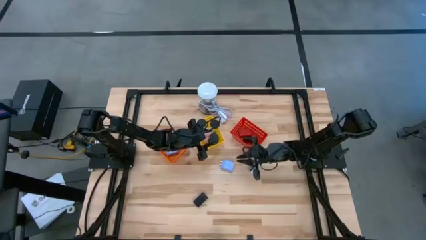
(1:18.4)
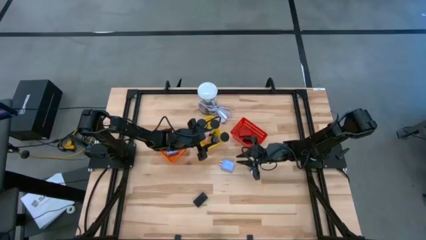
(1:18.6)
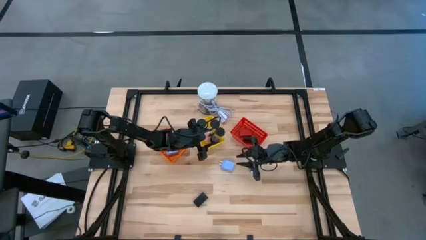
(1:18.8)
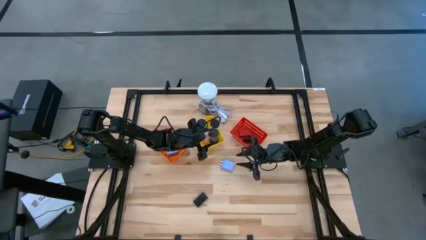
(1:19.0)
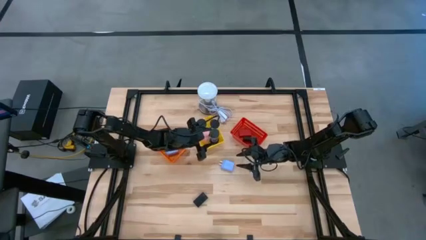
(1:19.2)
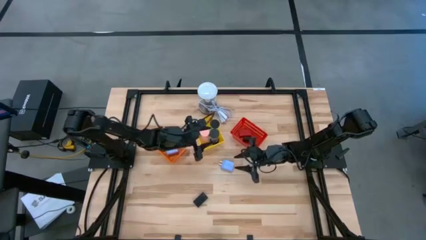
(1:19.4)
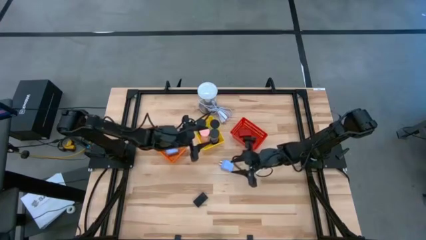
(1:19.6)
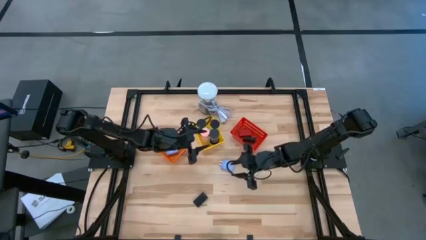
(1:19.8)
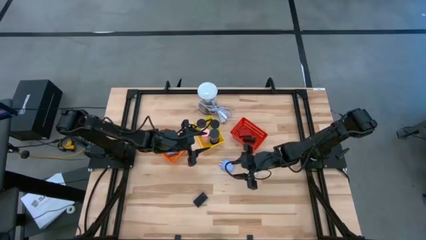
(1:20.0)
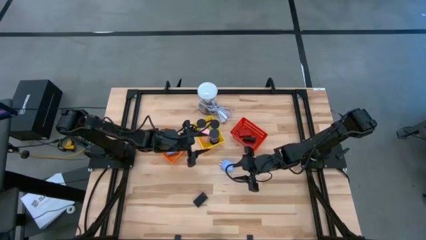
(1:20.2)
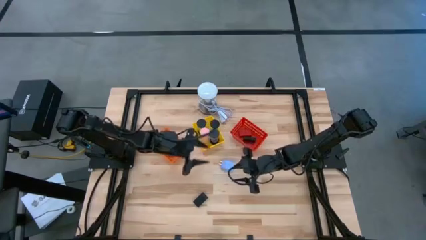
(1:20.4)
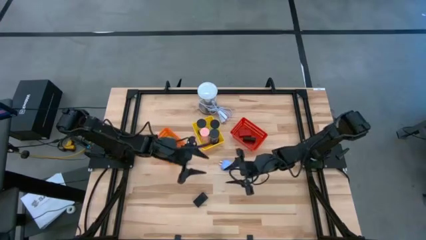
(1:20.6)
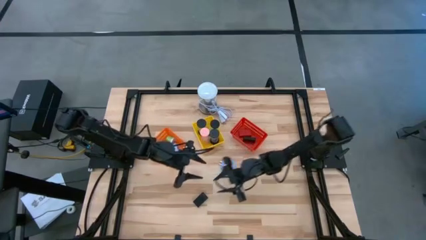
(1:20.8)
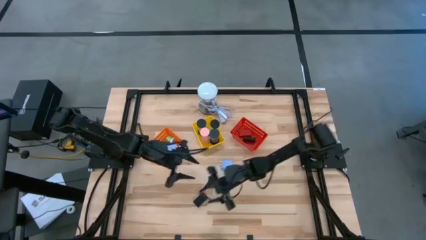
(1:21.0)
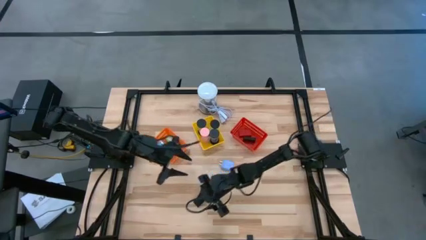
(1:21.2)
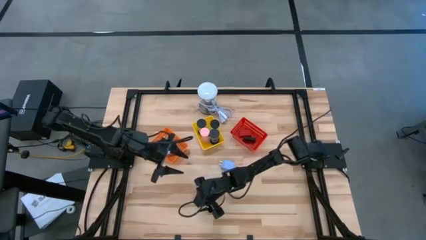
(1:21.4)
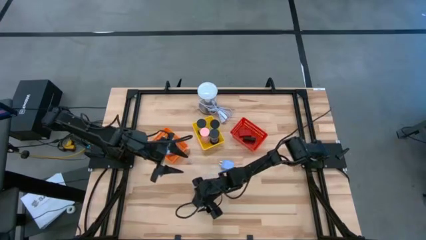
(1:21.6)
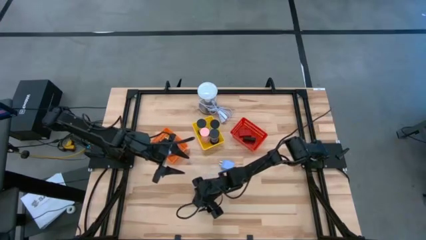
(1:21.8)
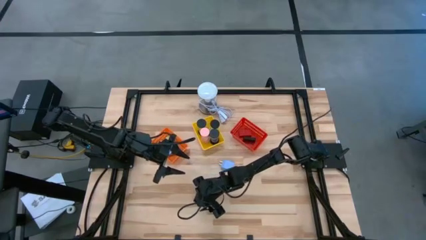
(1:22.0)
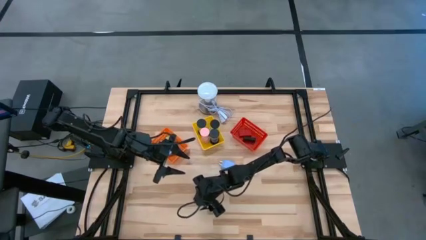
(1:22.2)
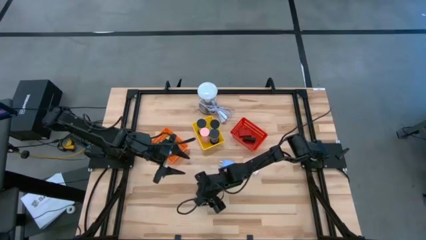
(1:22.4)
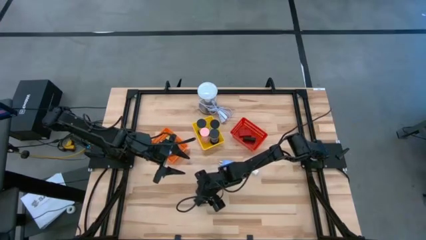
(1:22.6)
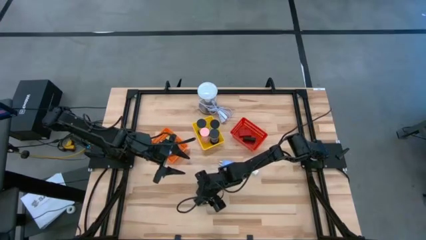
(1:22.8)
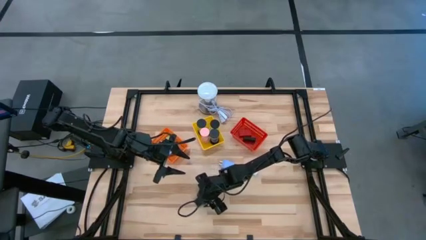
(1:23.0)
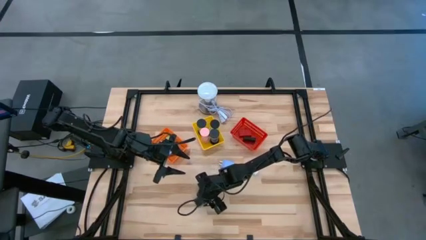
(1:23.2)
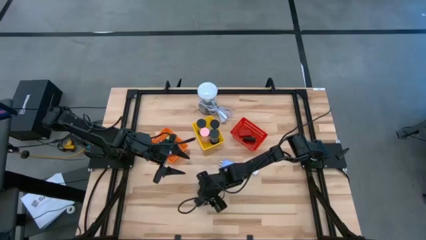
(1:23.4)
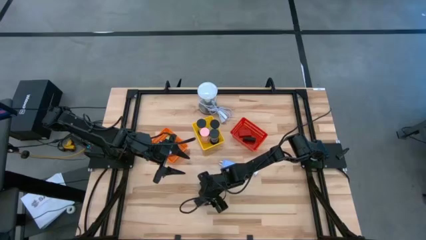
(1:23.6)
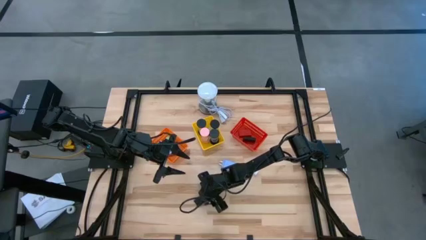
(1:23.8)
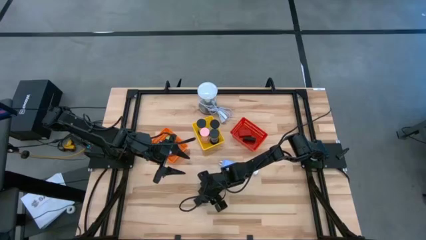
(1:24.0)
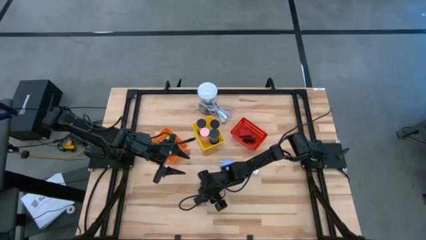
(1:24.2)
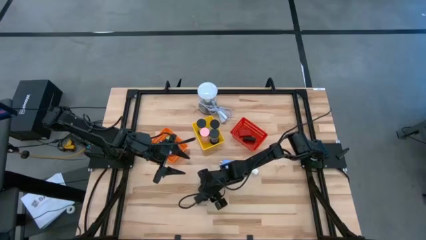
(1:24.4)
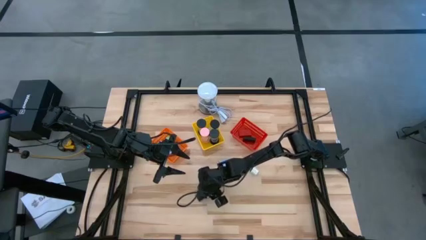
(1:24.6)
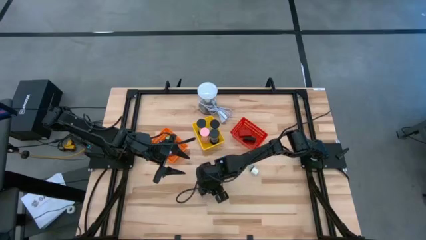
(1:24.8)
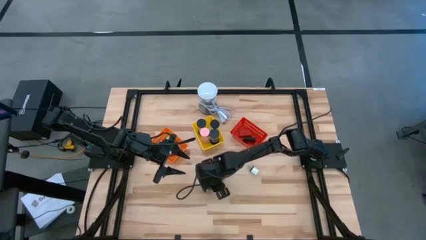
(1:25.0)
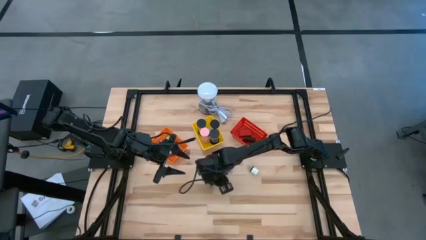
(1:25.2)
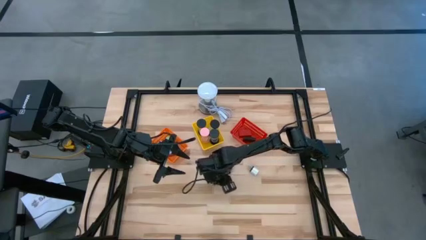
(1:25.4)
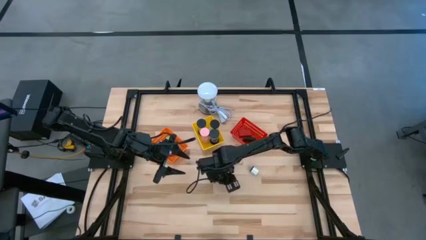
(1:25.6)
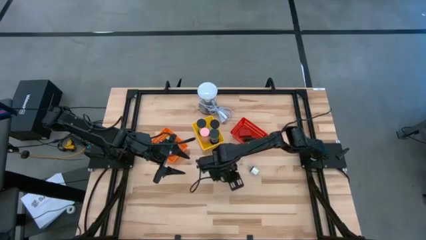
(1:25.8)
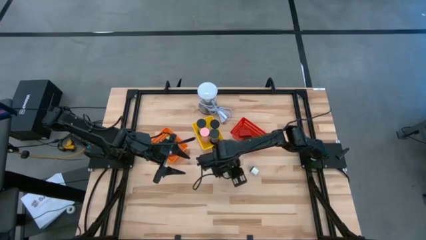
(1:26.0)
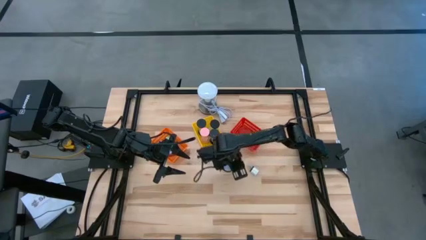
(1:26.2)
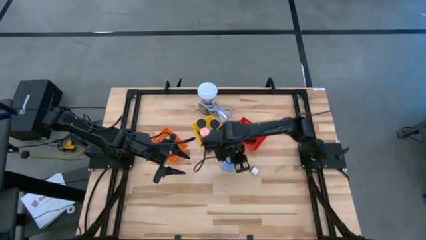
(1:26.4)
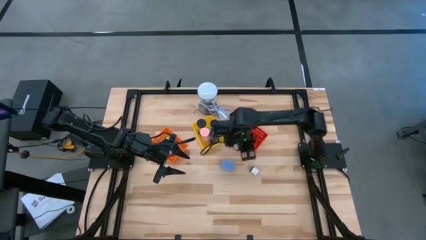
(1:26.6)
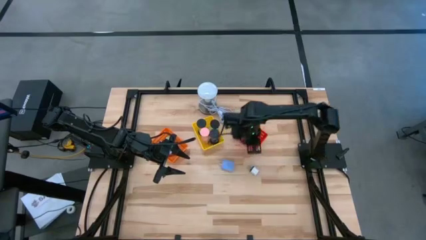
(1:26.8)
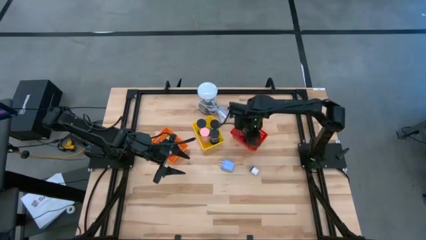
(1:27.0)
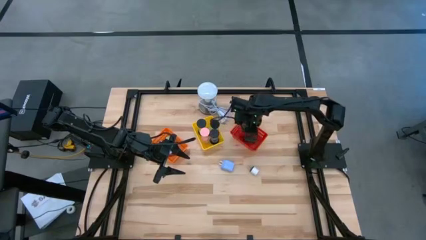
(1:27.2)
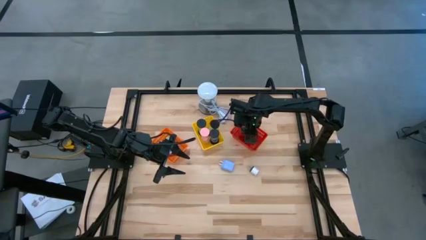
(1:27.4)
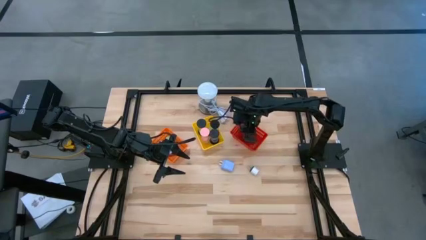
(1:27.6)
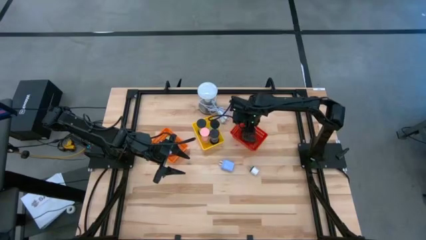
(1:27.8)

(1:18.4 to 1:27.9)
Task: Pick & Place Office items
Put the black digital timer into the red basket

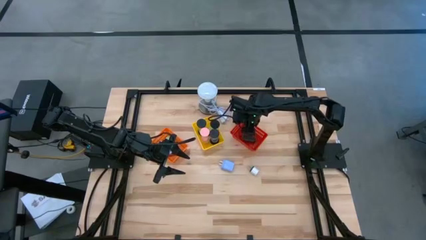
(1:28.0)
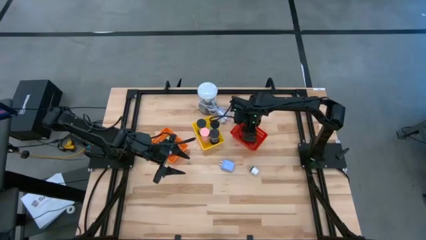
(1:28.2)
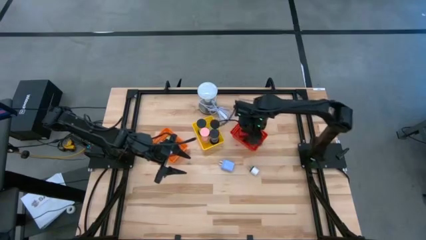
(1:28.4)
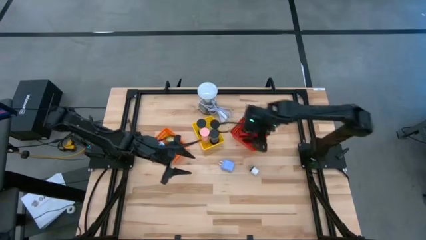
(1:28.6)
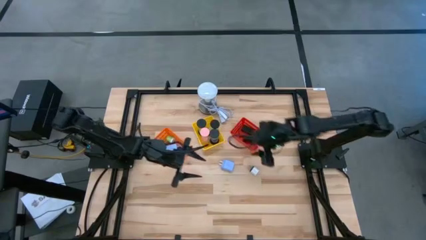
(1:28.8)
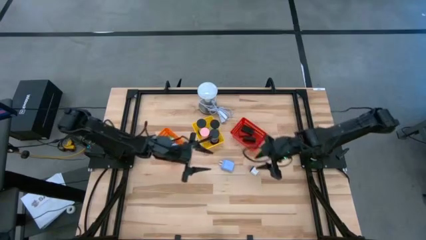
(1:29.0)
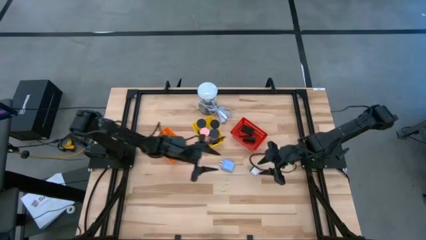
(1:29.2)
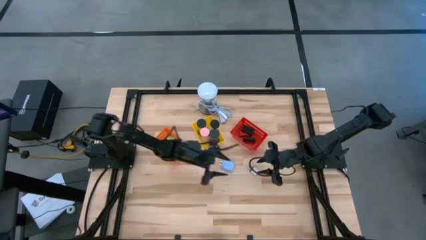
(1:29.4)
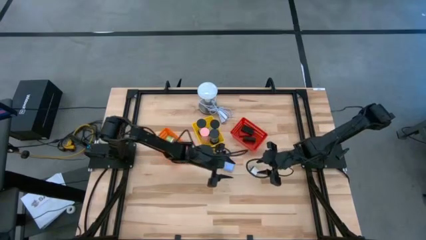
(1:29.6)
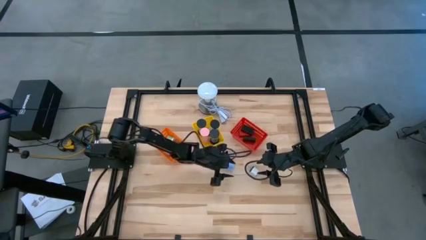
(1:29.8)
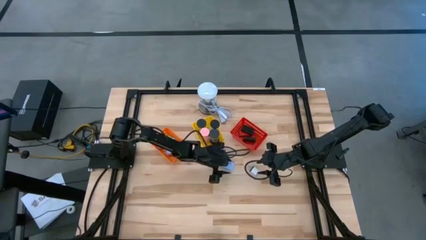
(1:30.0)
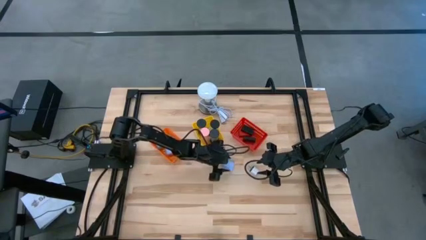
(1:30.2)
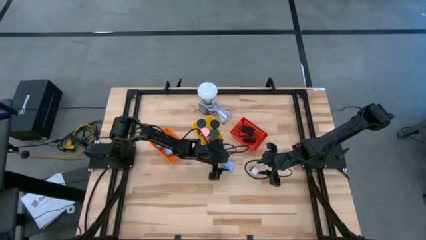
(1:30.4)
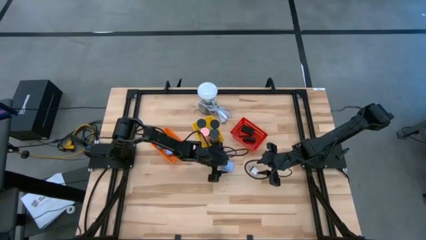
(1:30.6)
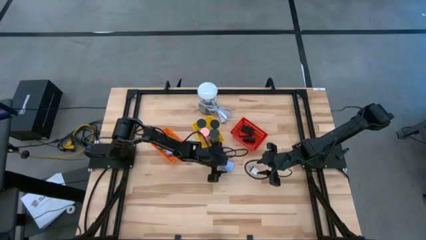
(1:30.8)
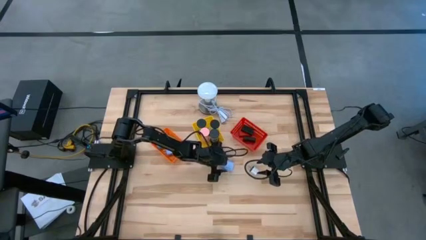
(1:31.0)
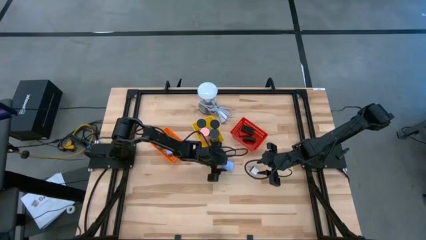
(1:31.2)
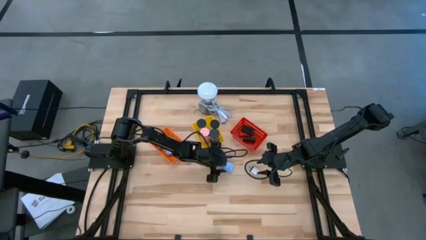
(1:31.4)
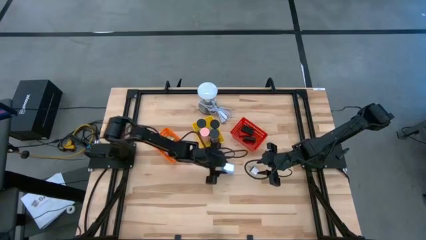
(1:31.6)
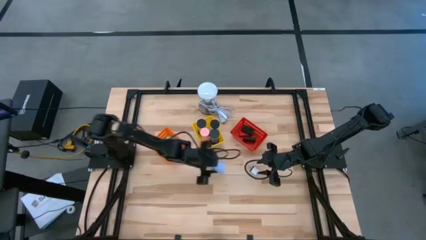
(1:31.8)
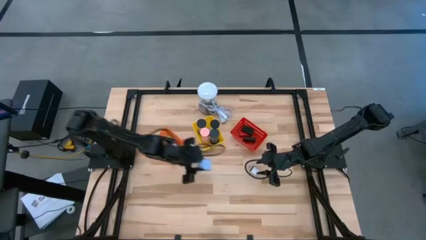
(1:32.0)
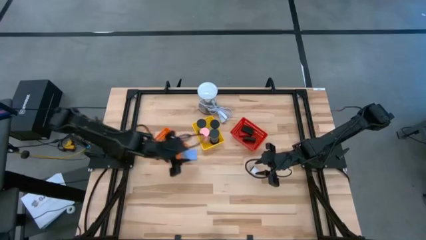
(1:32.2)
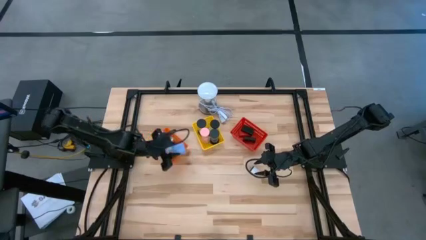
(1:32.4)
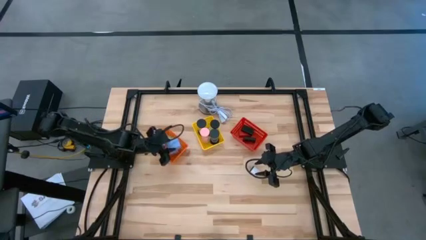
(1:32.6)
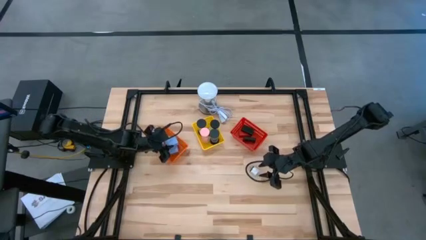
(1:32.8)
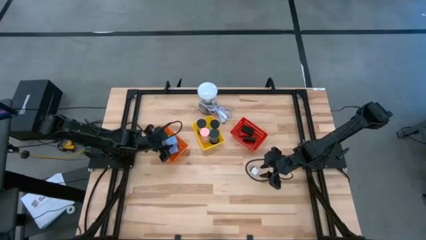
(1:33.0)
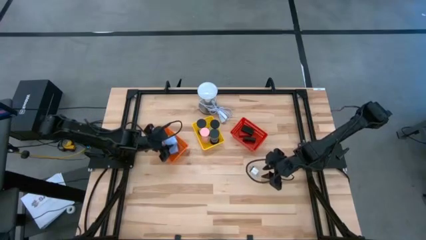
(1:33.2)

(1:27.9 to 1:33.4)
Put the large blue charger adapter into the orange basket
